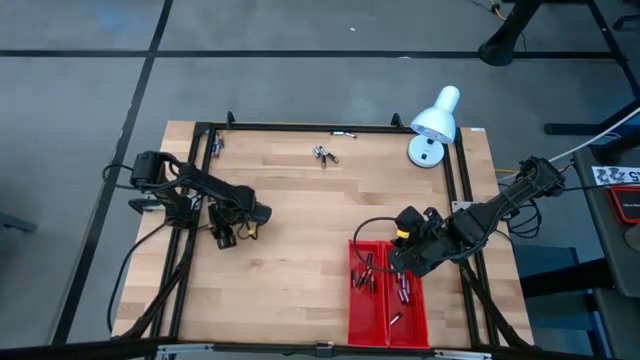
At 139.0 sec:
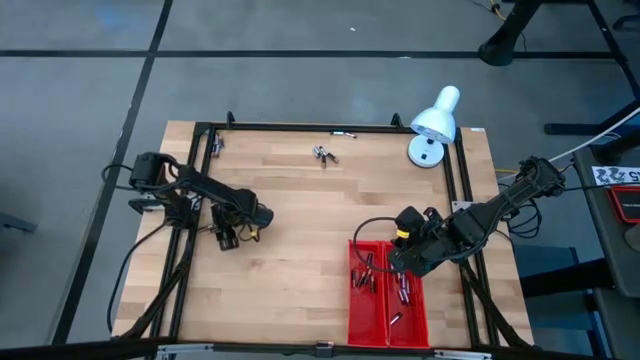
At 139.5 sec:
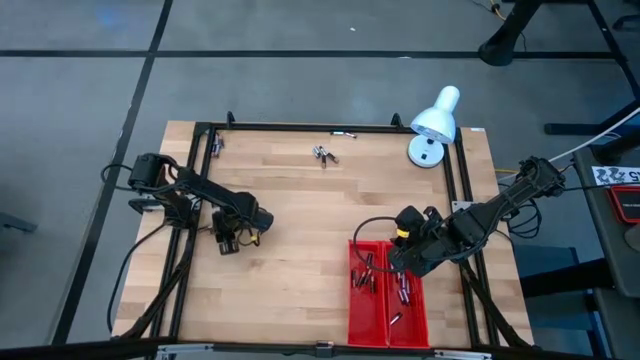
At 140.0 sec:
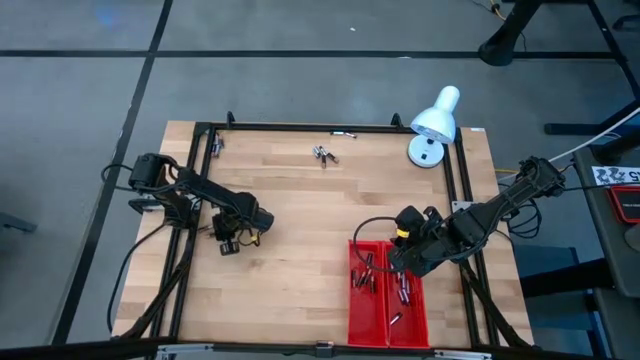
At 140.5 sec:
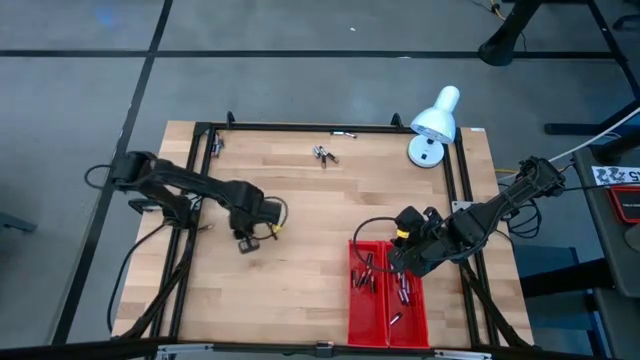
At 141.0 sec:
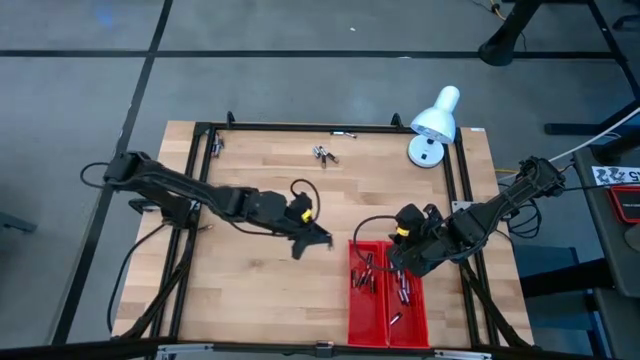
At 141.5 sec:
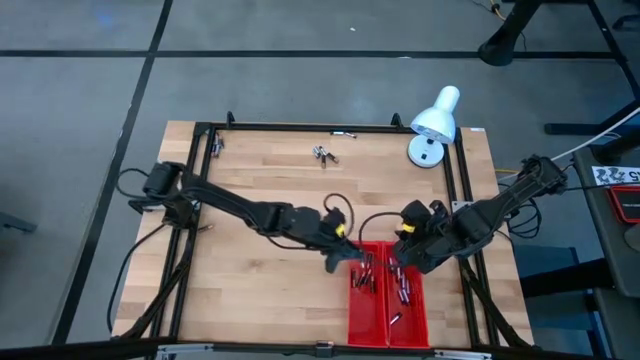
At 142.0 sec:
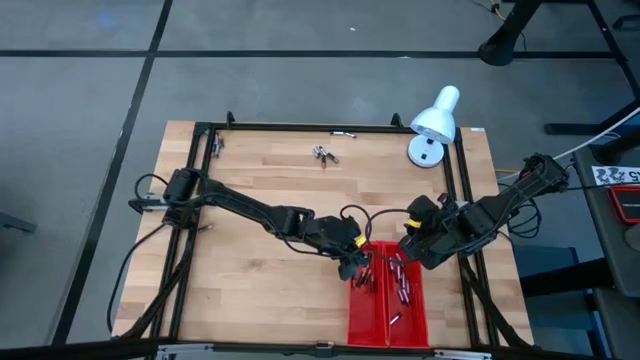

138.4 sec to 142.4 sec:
Task: Sort batteries
Put the black battery into the left red bin

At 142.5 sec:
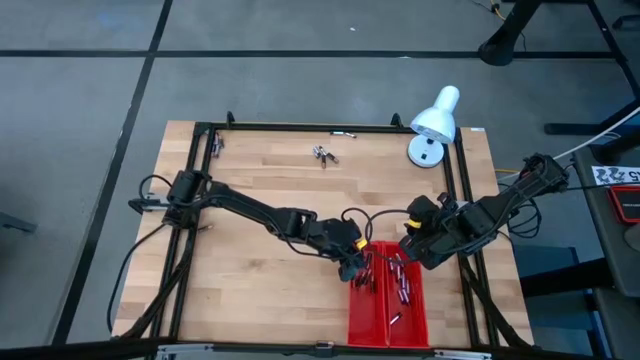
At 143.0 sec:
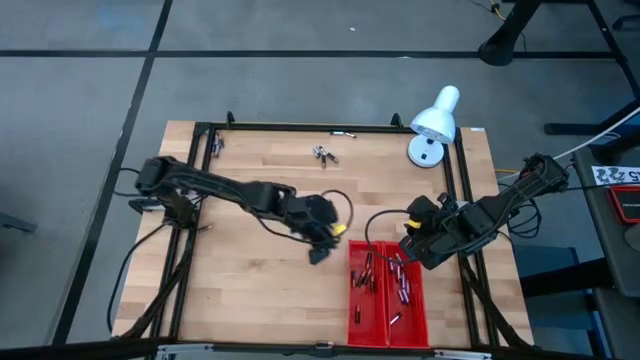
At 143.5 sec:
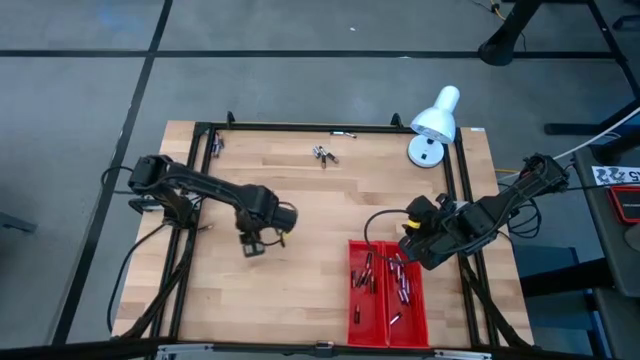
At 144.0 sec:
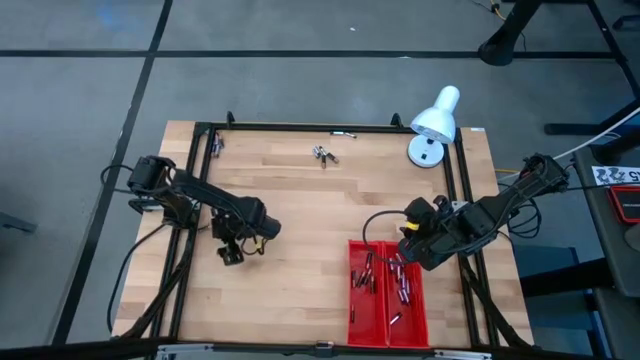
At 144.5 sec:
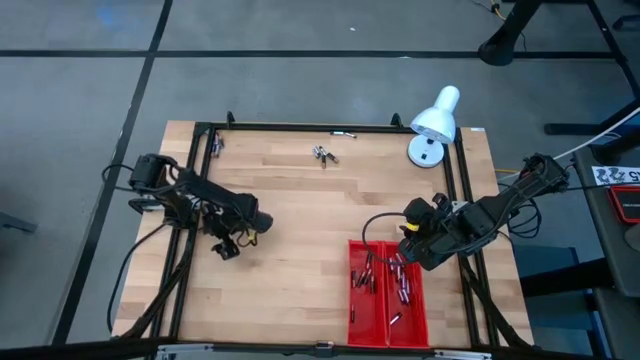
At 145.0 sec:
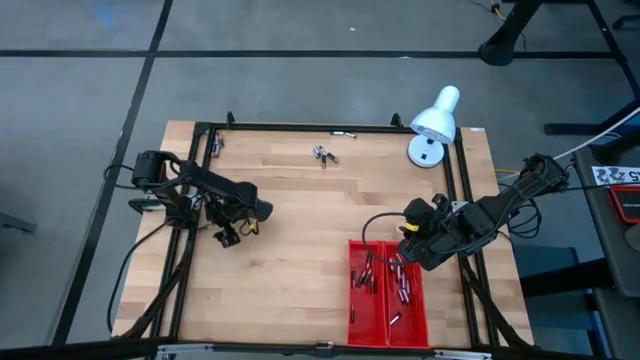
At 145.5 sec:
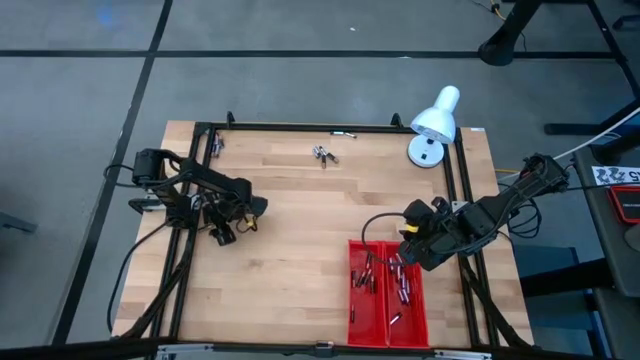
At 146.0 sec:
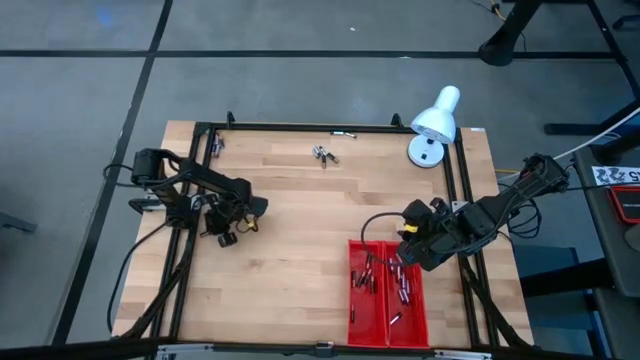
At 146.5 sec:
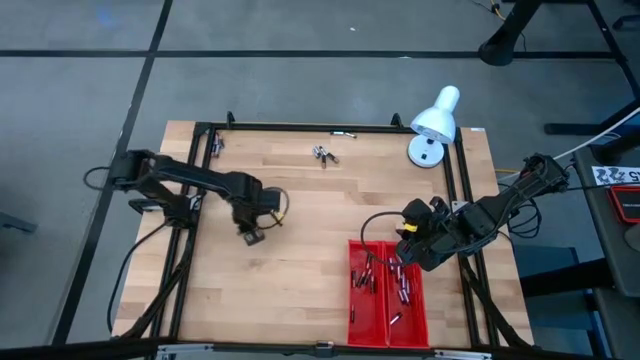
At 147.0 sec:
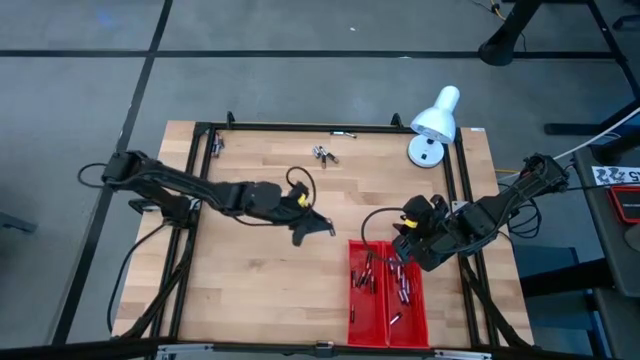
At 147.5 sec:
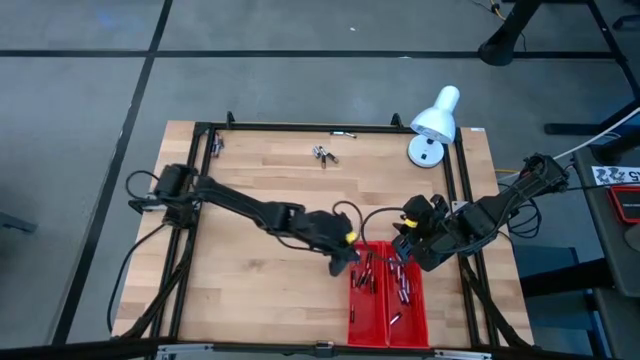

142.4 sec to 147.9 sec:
Put the black battery into the left red bin

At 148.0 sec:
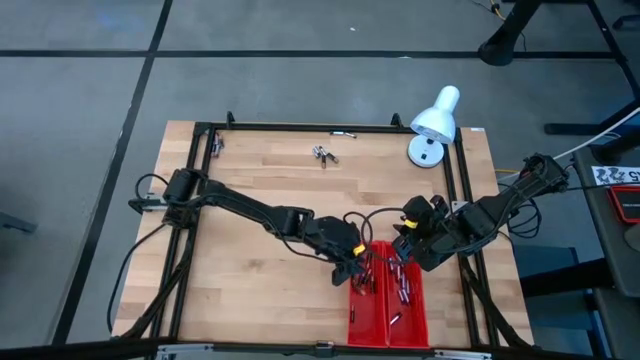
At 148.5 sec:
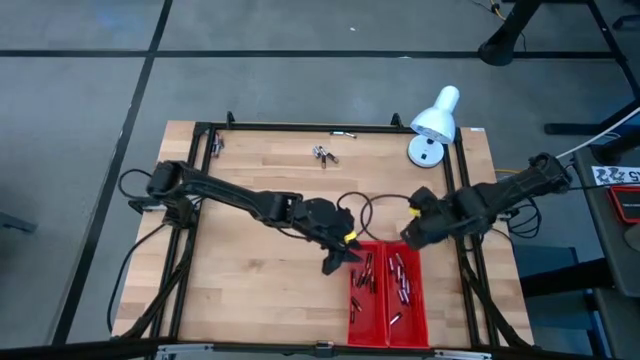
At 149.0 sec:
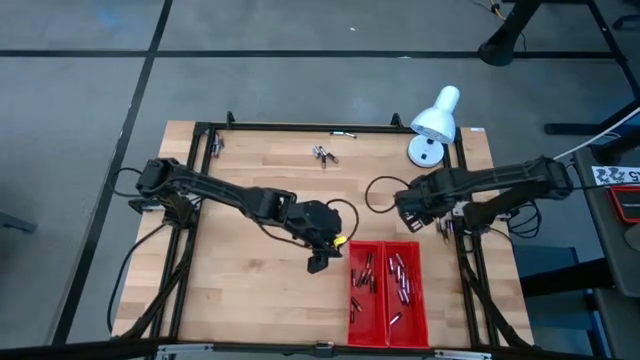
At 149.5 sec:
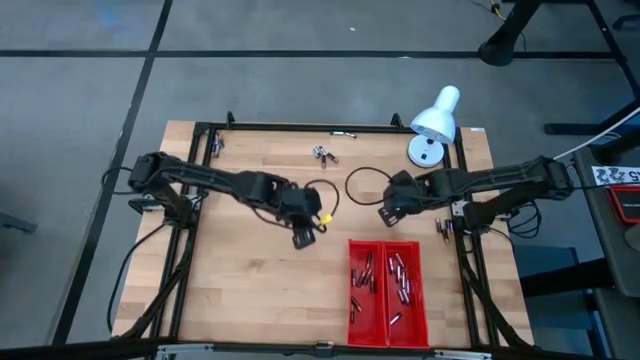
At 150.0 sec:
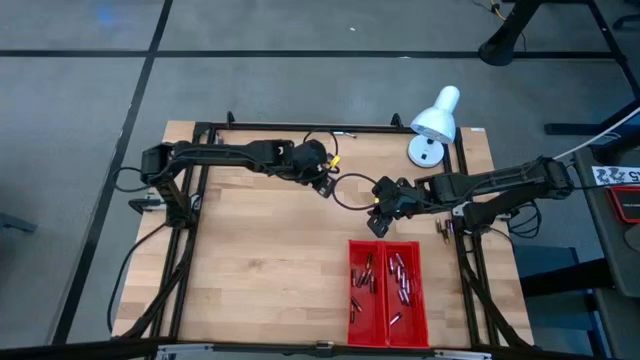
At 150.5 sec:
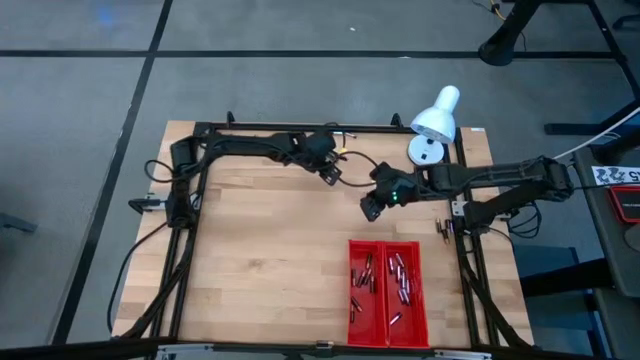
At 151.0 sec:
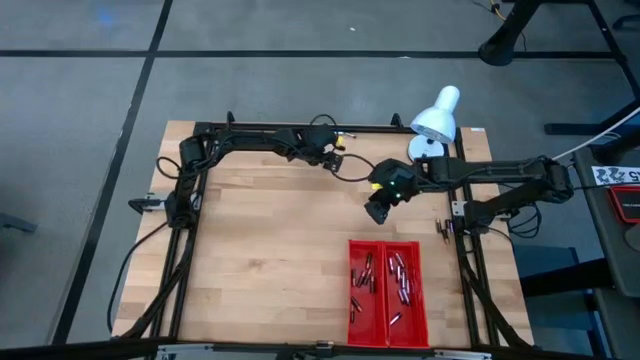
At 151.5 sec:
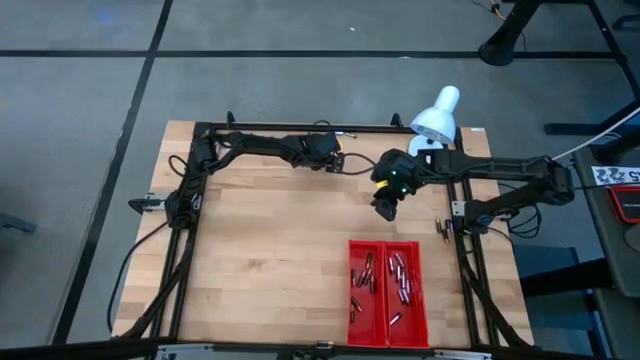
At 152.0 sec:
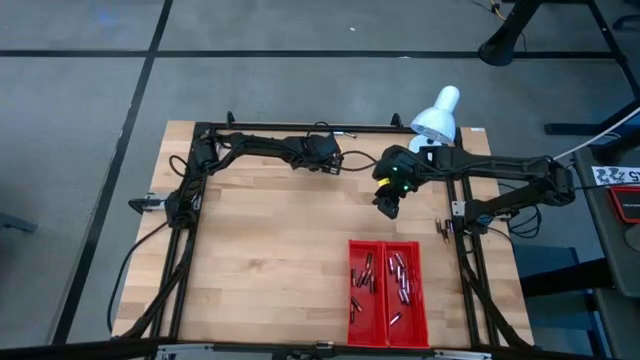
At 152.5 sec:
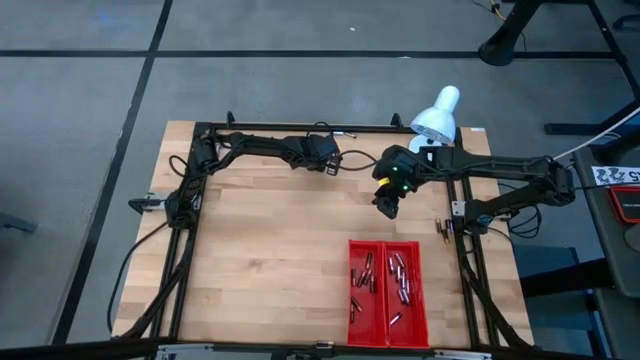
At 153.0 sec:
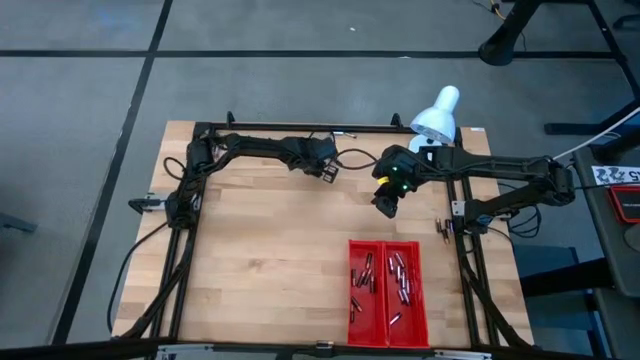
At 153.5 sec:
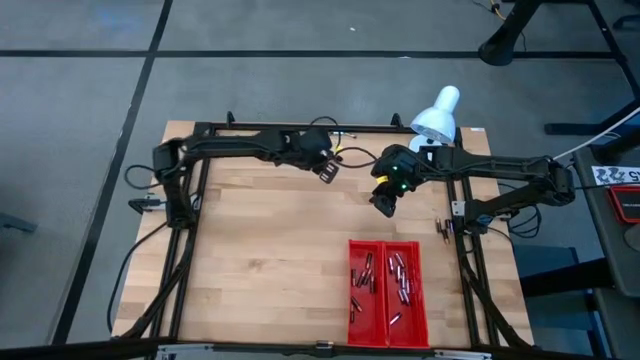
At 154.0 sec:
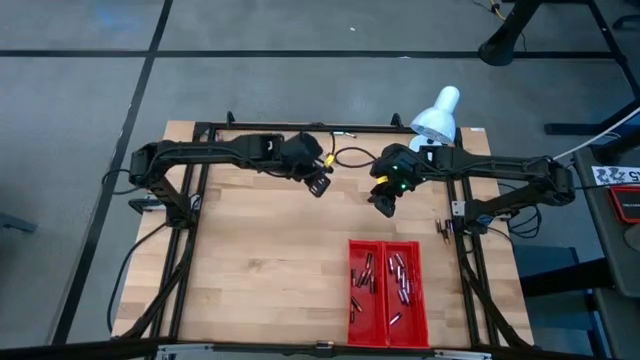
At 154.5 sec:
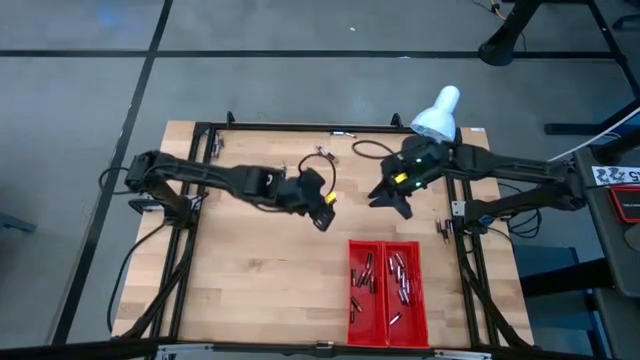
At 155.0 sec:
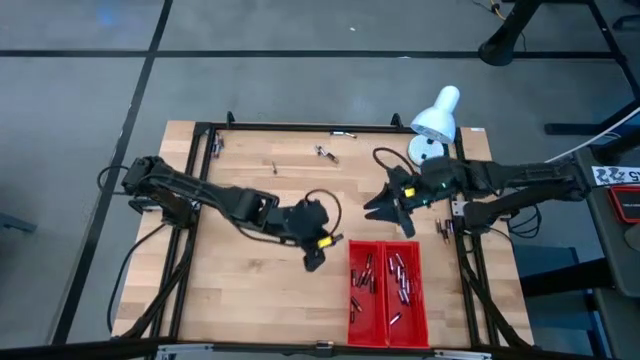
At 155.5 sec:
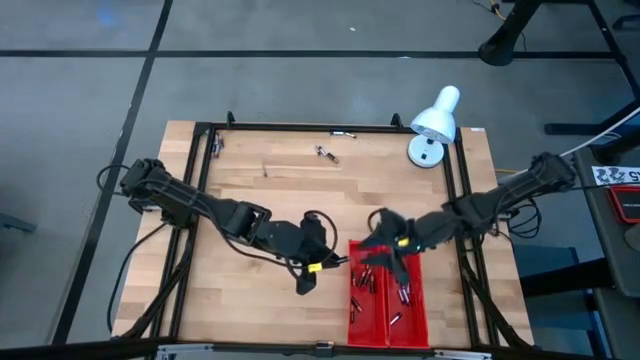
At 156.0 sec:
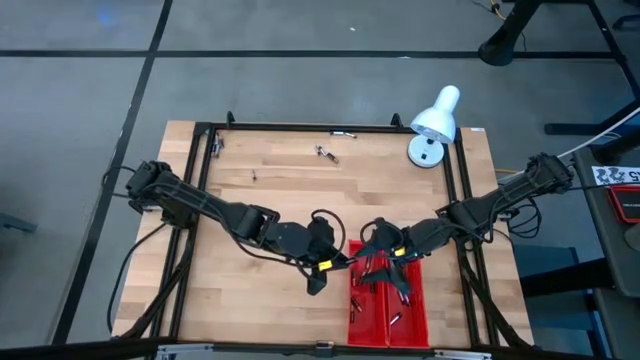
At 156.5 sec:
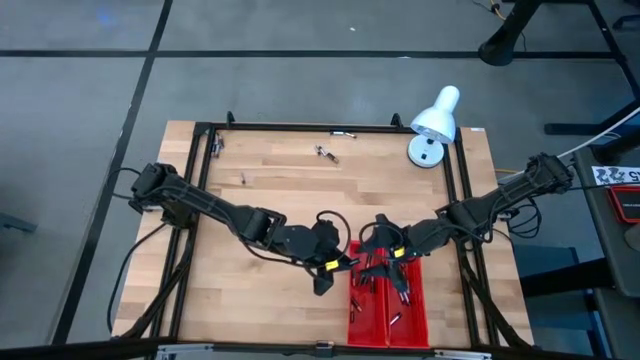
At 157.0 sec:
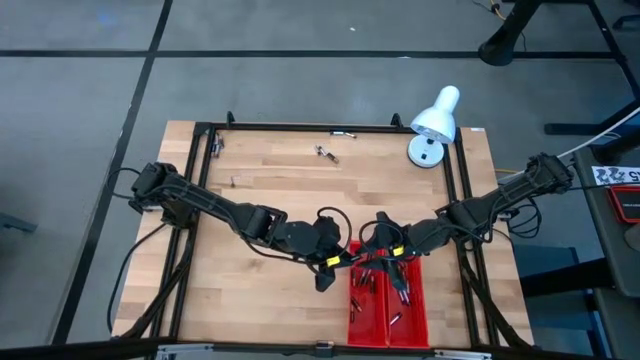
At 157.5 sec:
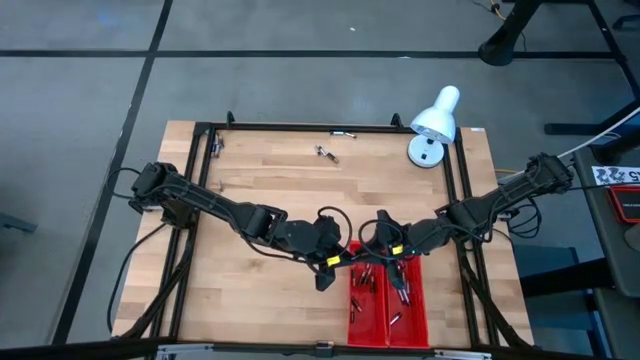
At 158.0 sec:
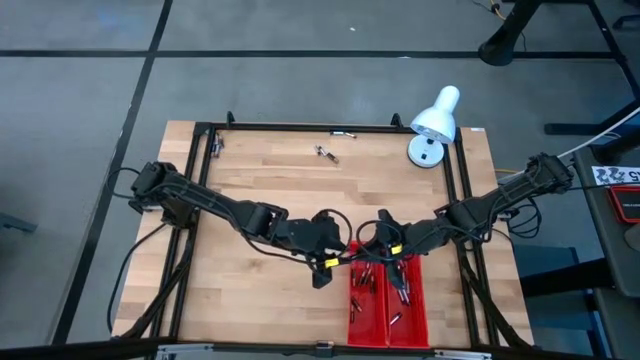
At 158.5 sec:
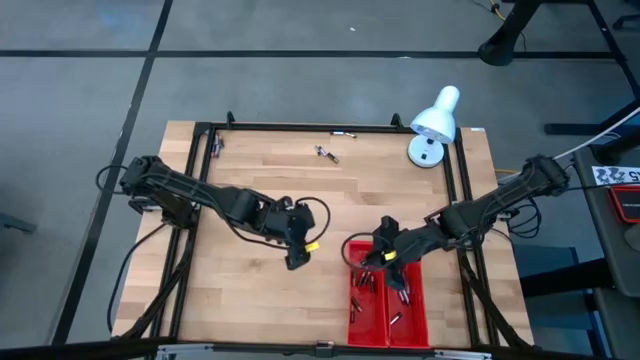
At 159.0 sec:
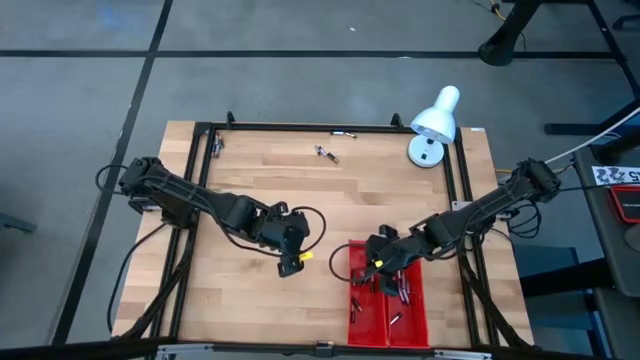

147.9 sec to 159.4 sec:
Put the black battery into the left red bin
